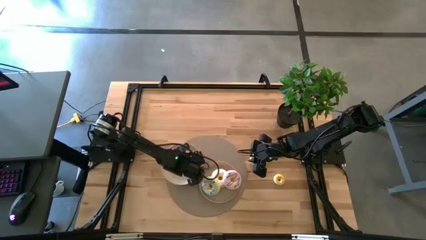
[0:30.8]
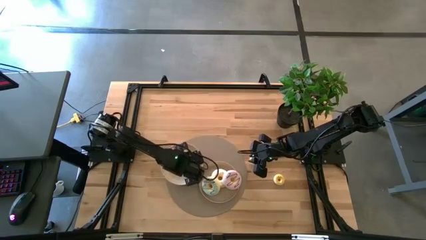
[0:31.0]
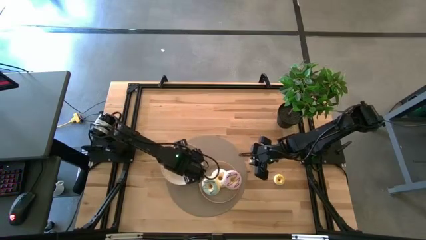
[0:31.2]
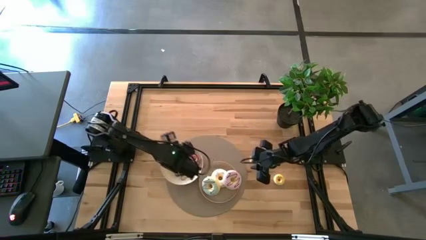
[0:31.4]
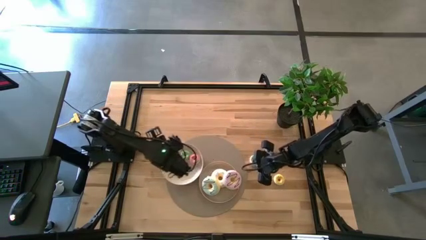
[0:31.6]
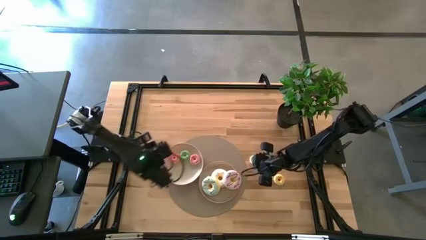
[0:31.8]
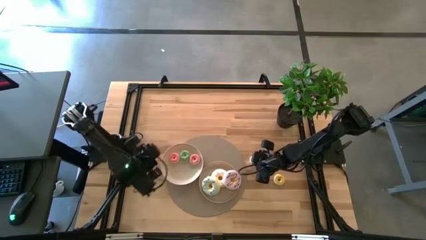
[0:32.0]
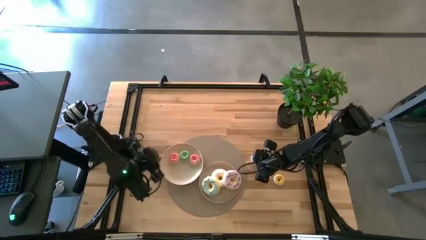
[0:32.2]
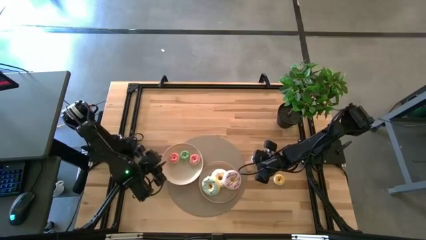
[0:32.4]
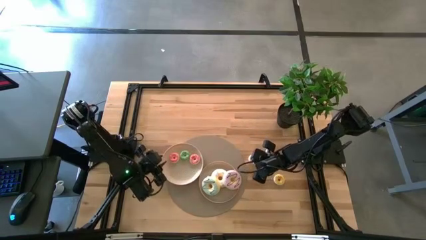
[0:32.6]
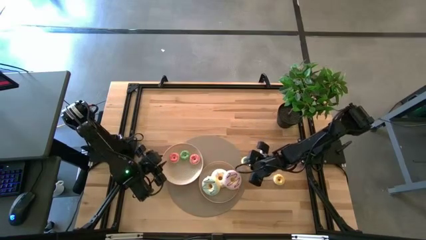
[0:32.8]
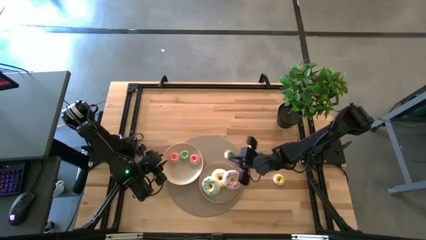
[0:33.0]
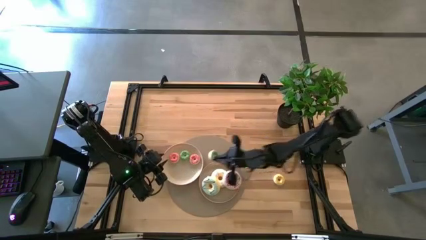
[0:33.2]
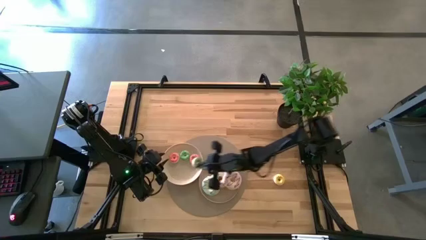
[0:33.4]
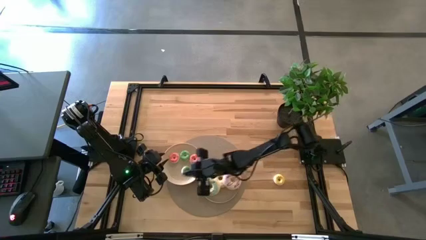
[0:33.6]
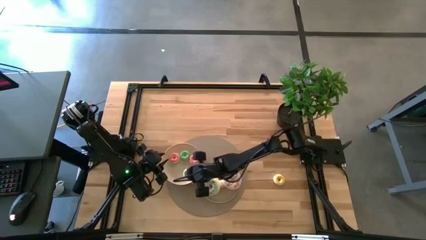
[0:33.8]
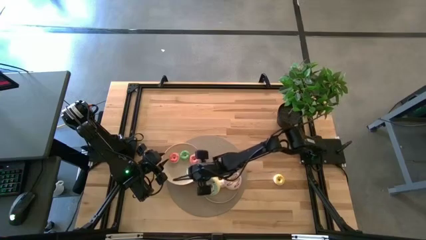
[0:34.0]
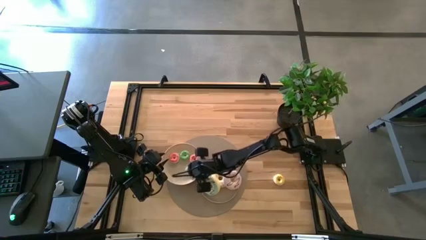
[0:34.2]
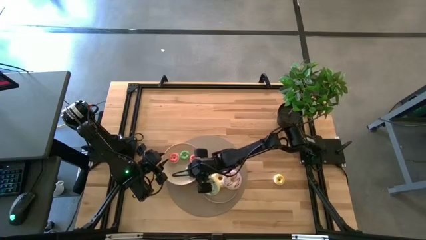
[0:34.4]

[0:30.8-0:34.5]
Task: Pick & Place donuts
Put the small green donut on the top white plate

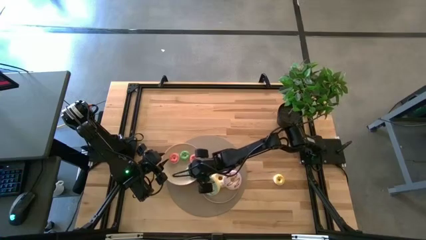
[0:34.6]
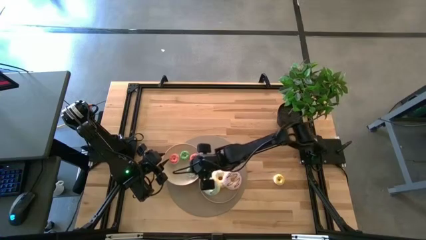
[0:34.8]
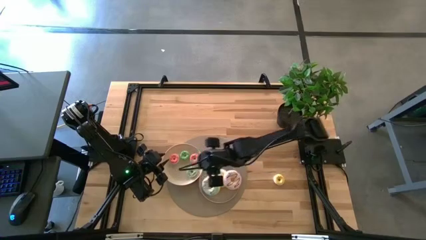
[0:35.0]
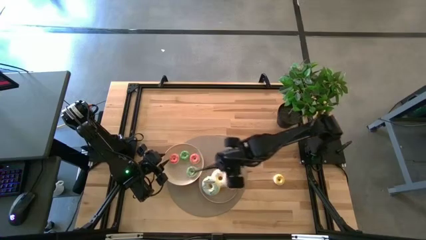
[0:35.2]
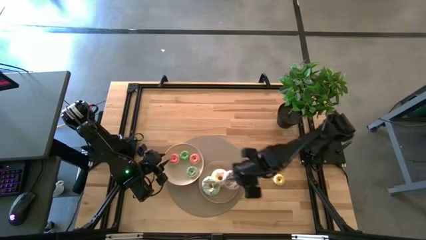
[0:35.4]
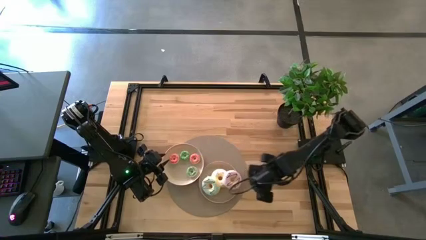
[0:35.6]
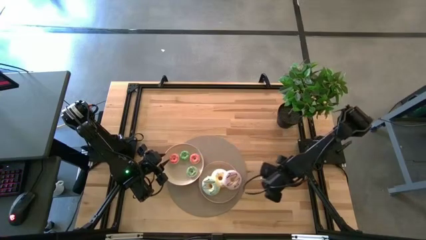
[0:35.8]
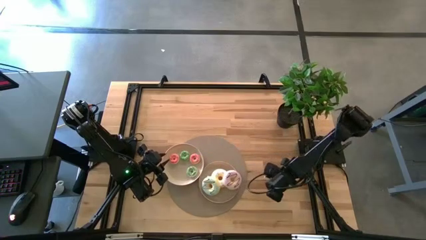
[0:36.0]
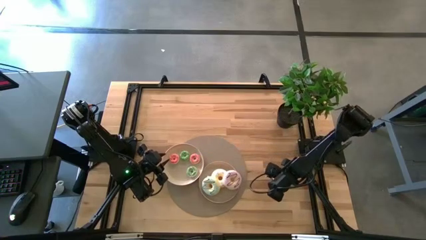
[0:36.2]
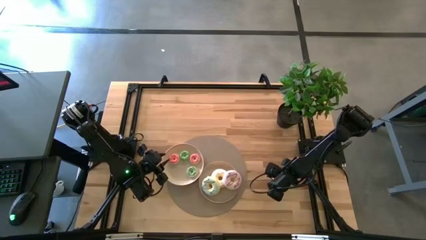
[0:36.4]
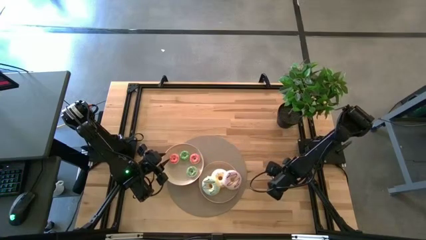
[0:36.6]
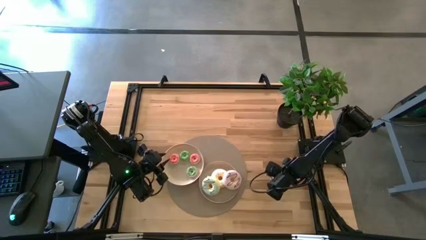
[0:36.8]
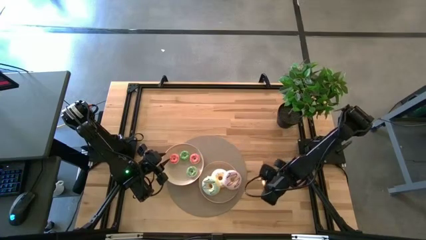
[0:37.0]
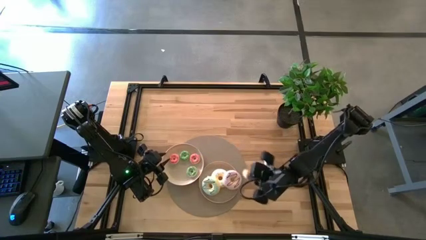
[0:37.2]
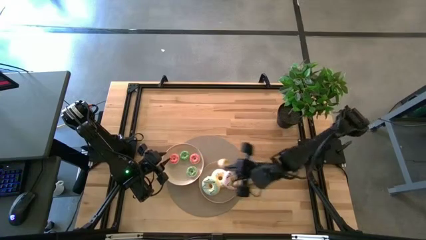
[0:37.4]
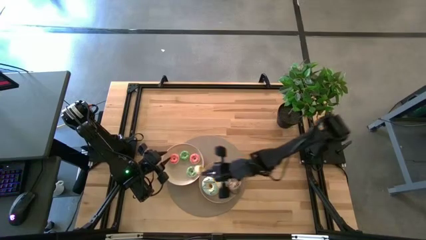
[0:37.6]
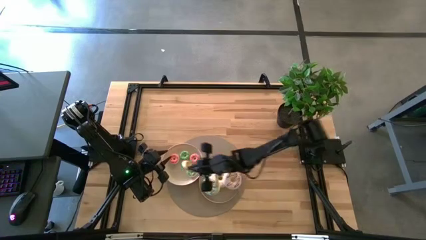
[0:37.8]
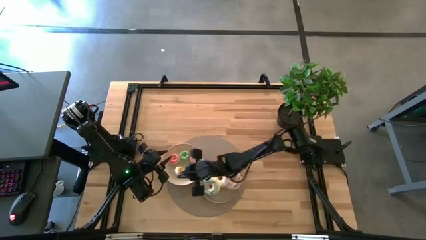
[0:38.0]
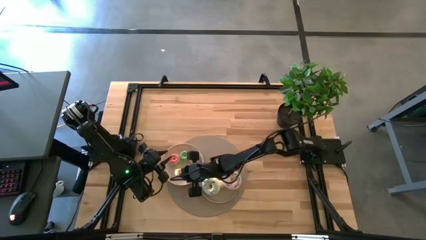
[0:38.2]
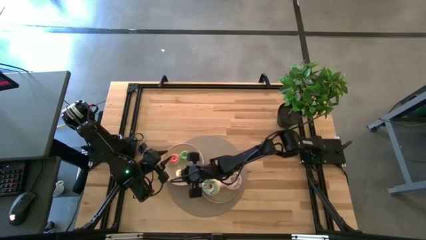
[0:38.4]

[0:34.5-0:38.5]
Put the small yellow donut on the top white plate

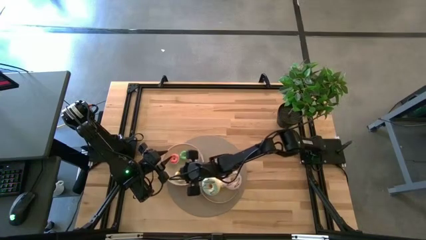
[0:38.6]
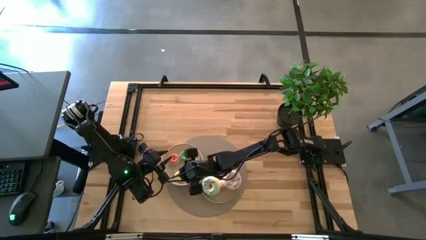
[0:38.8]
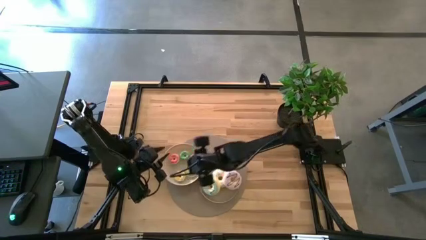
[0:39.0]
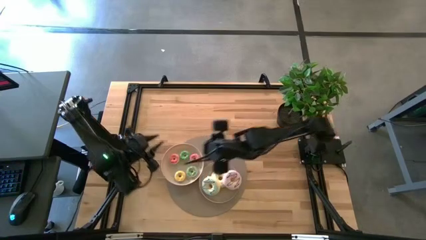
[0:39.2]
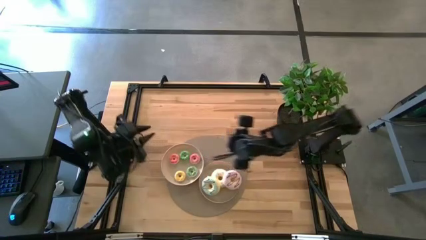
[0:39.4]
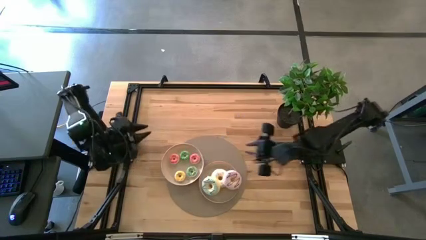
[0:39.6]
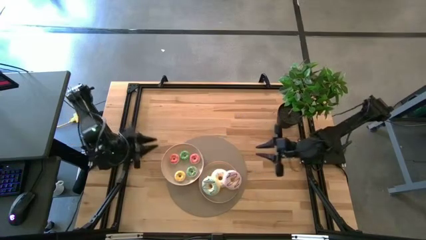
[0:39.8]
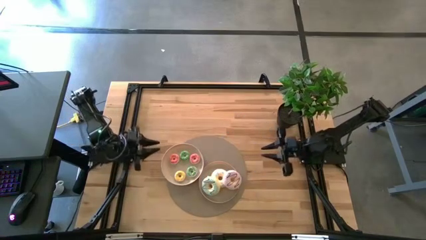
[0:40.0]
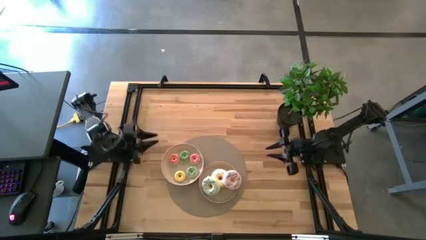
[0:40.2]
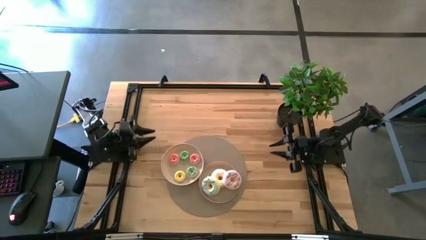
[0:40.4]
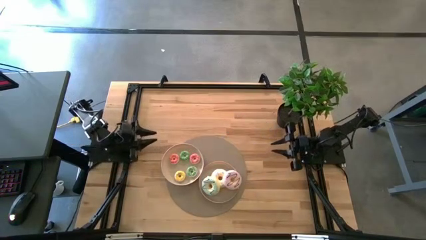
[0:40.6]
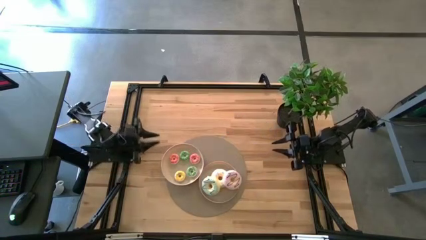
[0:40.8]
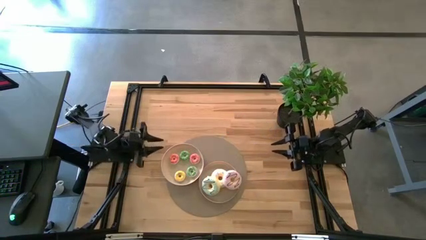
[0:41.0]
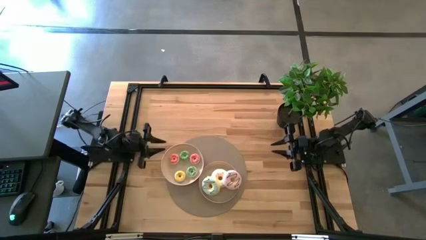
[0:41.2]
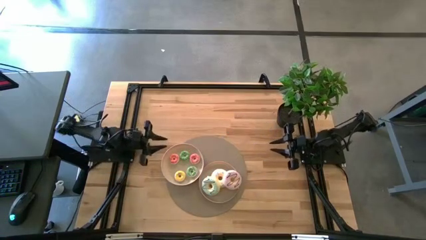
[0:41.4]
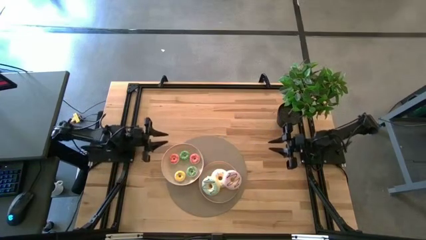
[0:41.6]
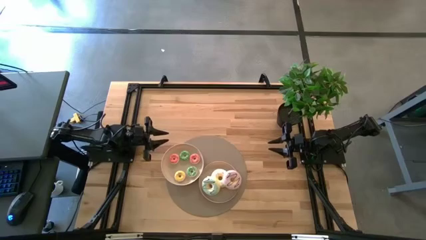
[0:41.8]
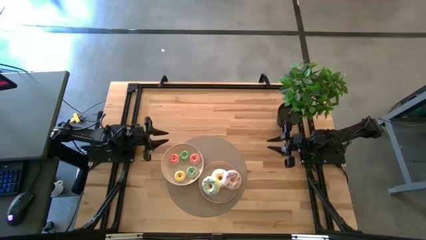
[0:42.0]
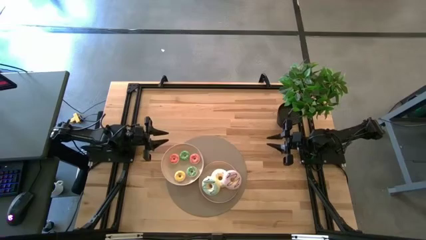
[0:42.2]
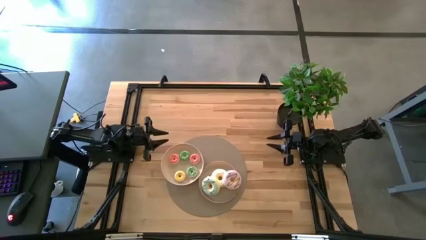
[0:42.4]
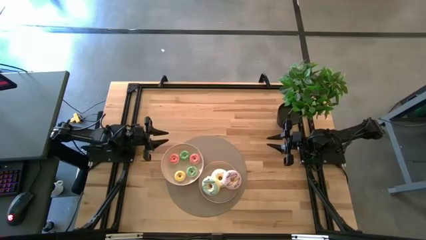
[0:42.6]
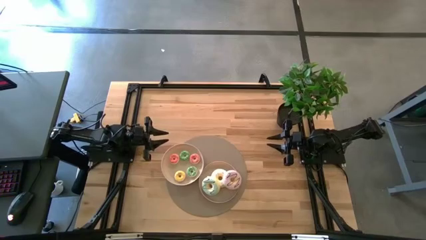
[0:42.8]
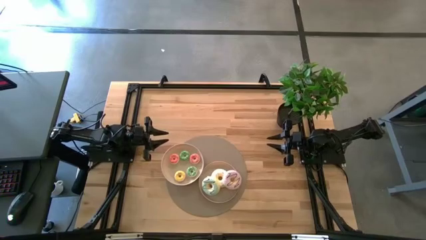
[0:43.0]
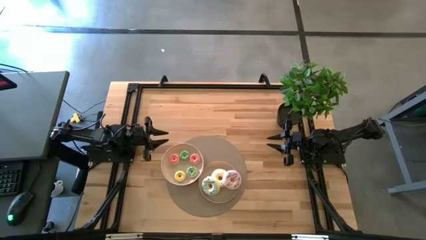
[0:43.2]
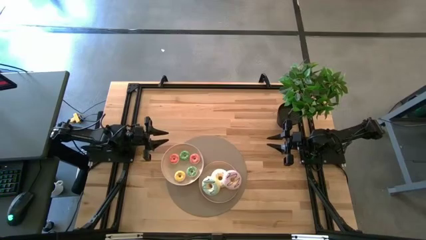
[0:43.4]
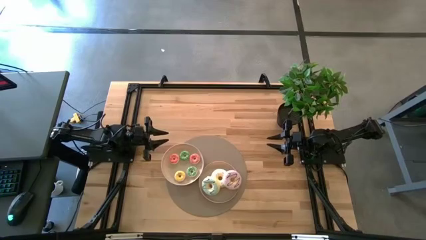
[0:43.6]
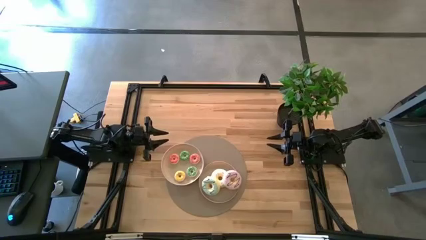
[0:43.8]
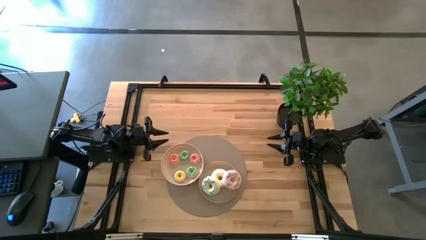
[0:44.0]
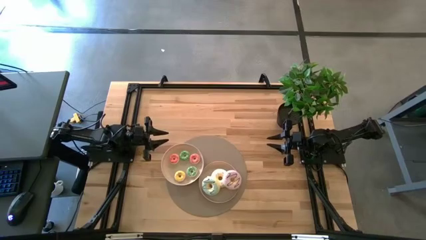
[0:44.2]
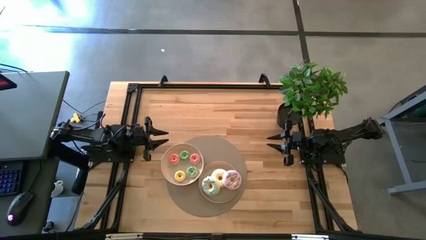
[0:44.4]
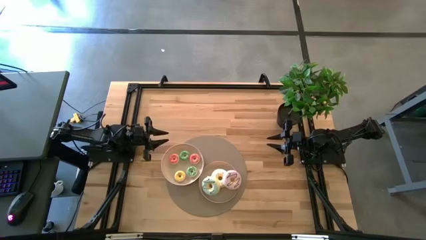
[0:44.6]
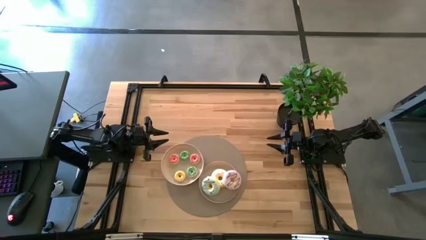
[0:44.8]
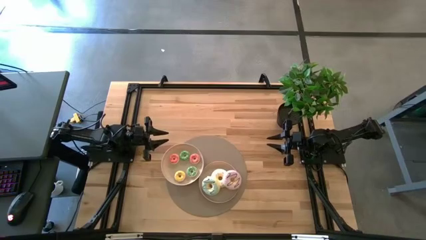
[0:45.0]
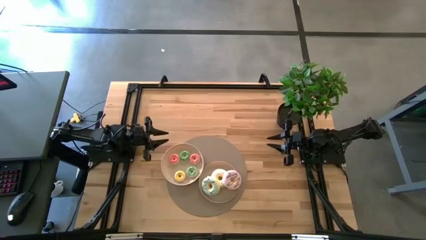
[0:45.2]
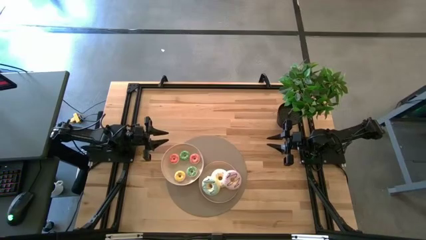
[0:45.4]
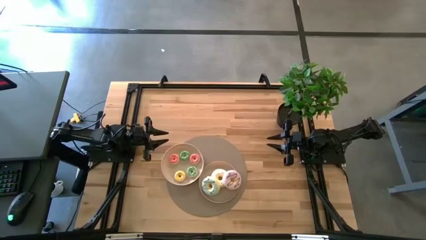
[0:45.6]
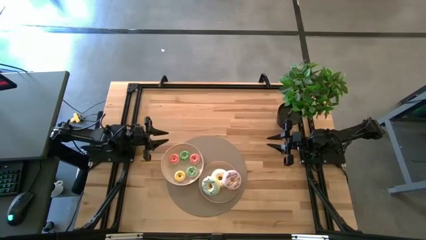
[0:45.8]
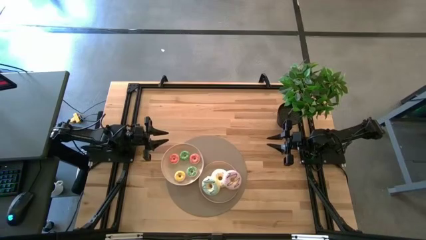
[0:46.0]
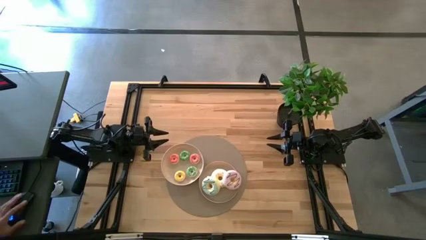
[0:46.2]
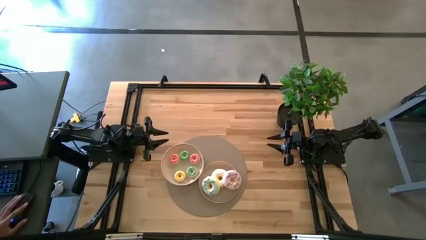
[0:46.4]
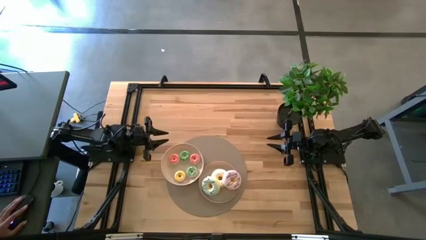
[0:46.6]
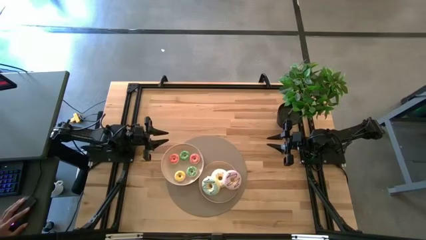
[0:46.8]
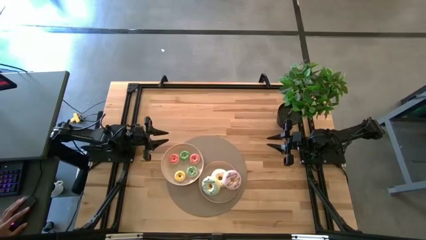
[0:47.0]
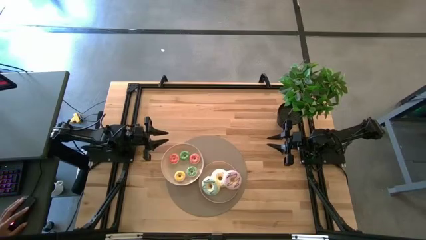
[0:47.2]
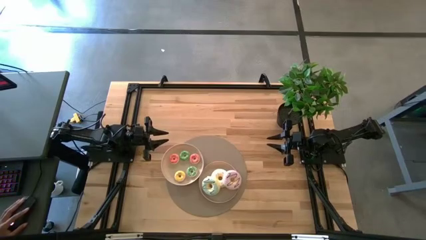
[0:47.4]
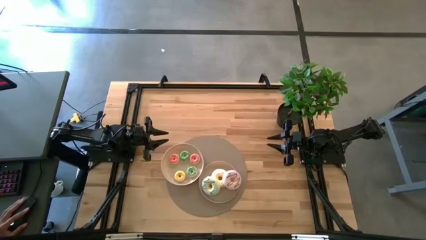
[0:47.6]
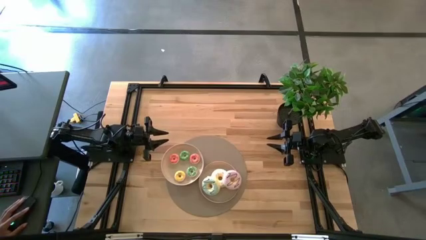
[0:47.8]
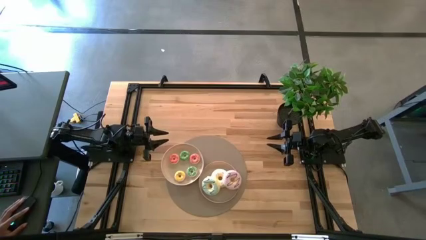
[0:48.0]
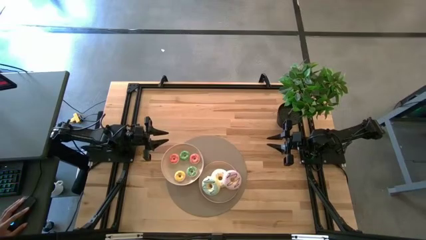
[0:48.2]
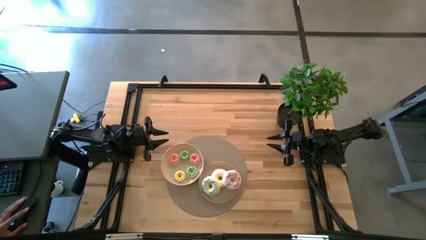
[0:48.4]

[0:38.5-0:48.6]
Return to Home Position
